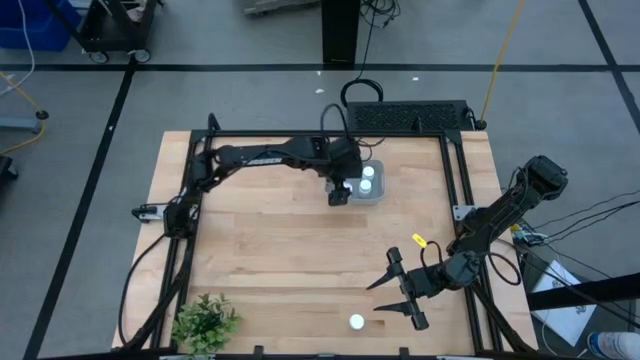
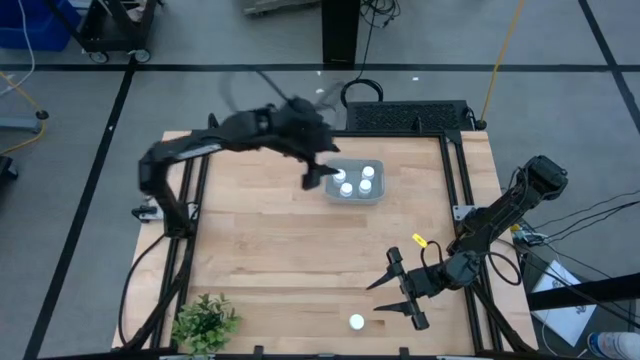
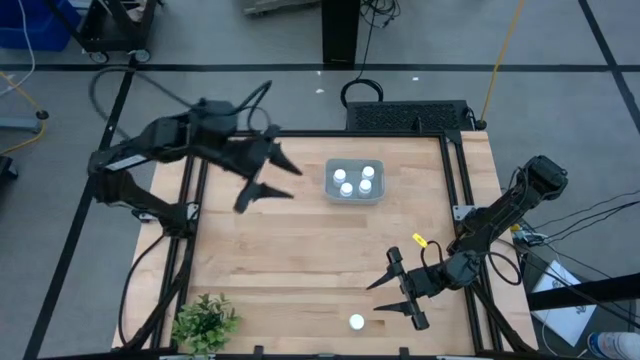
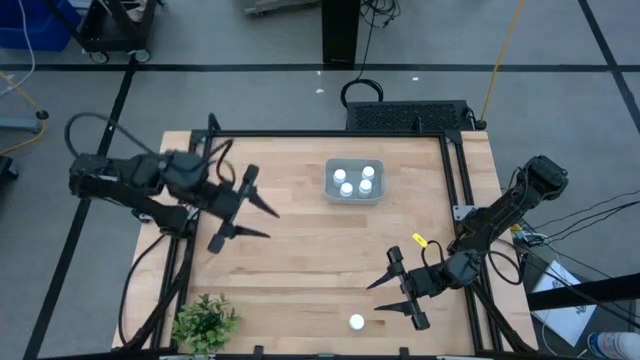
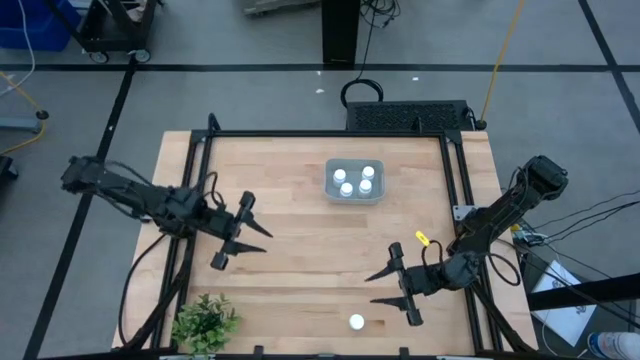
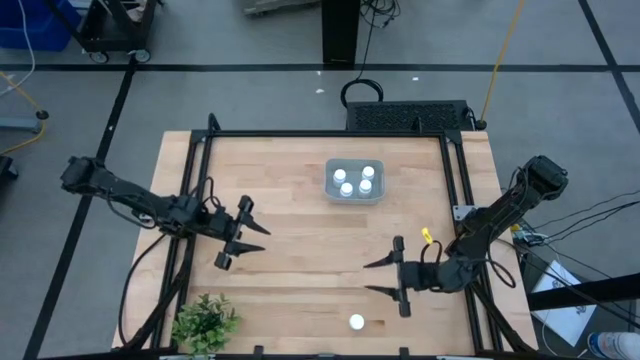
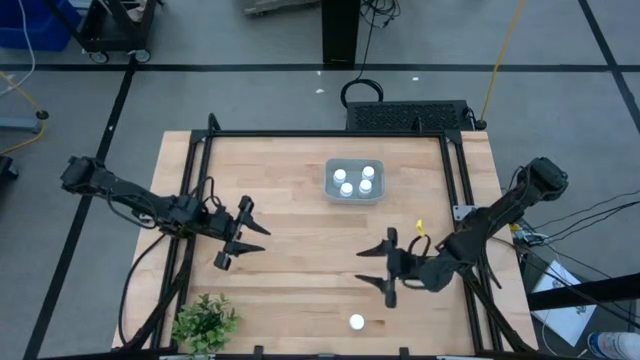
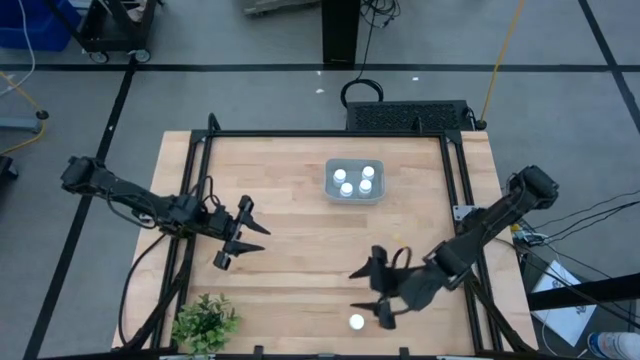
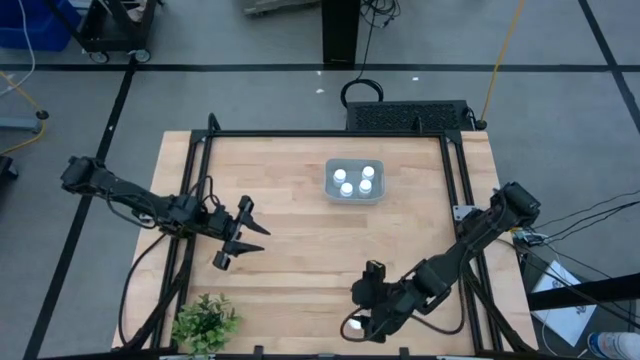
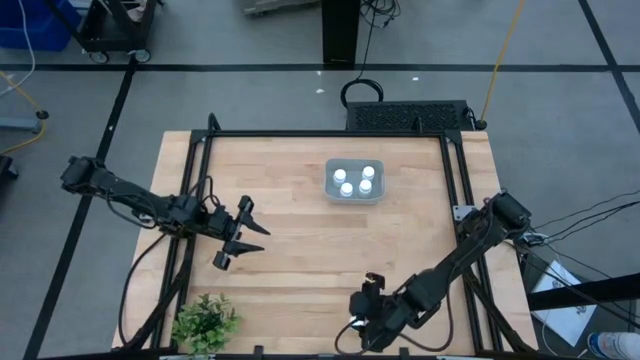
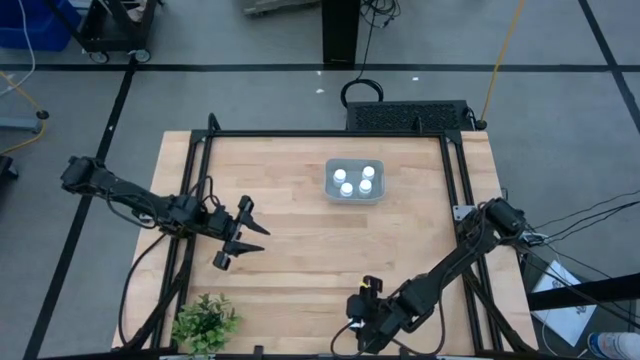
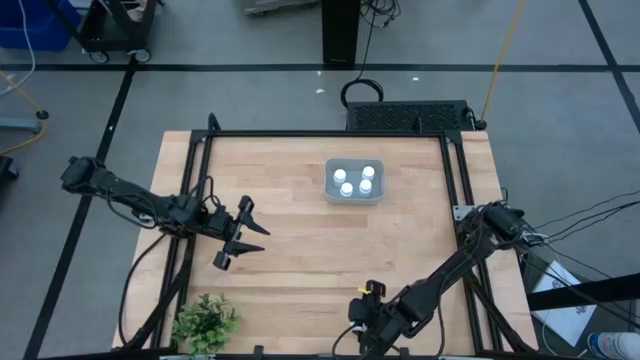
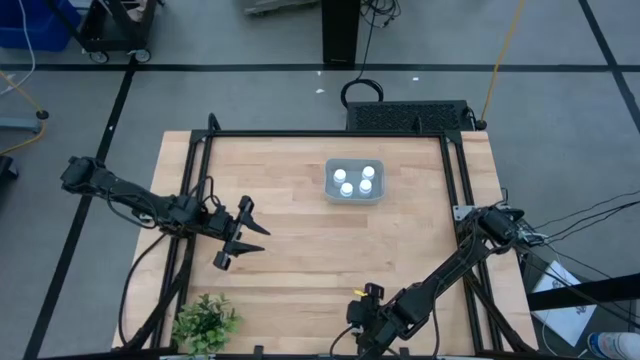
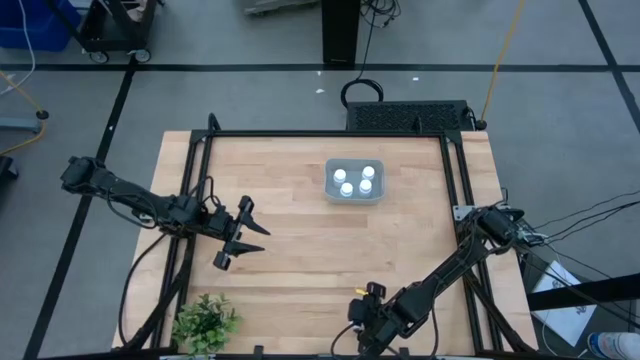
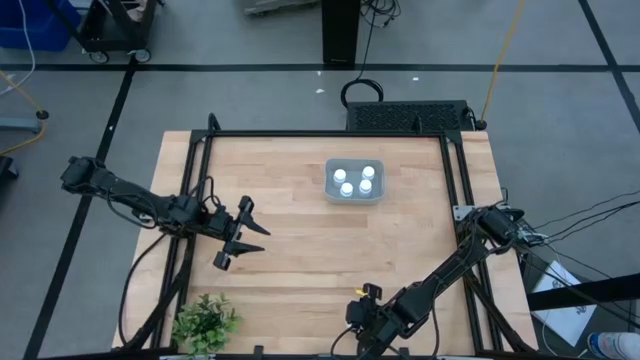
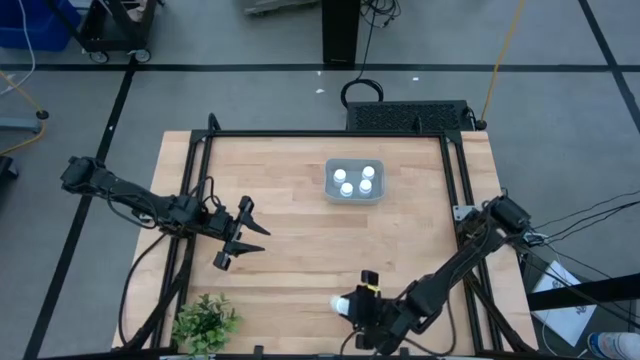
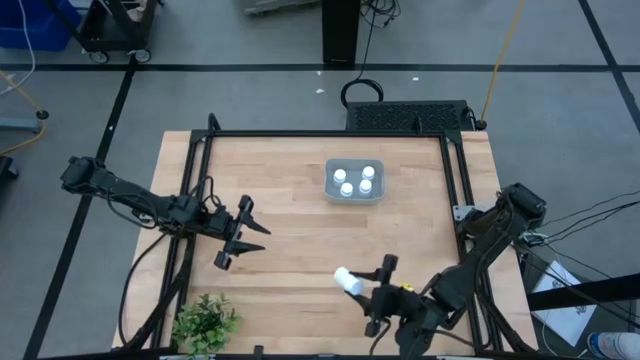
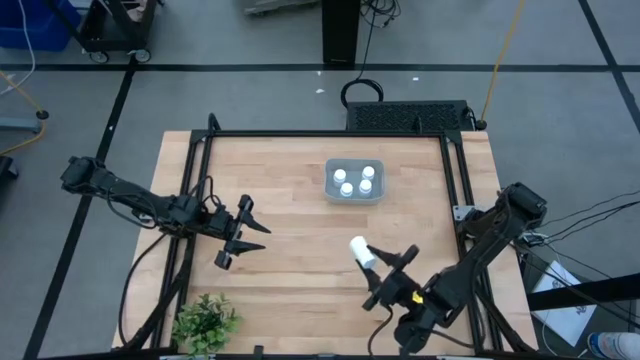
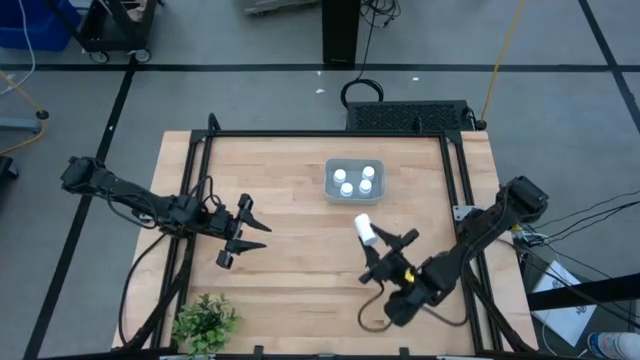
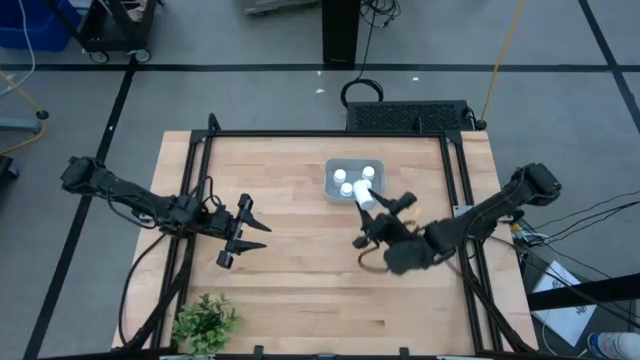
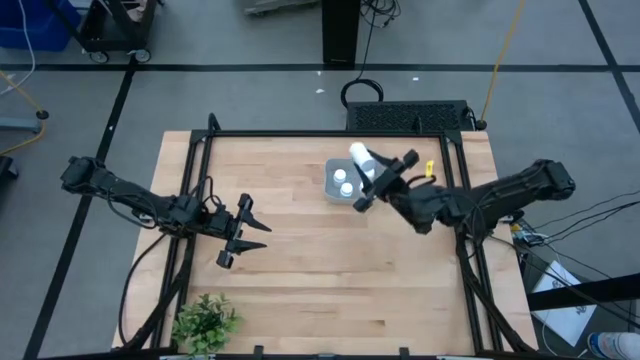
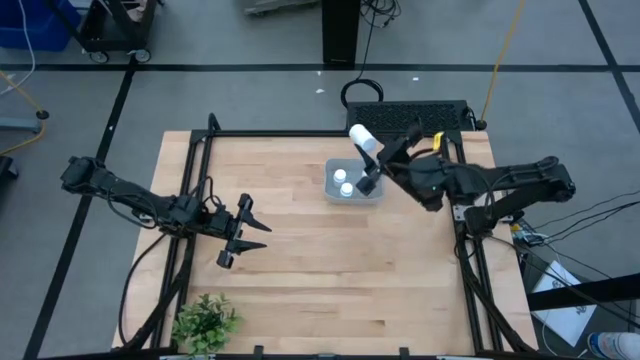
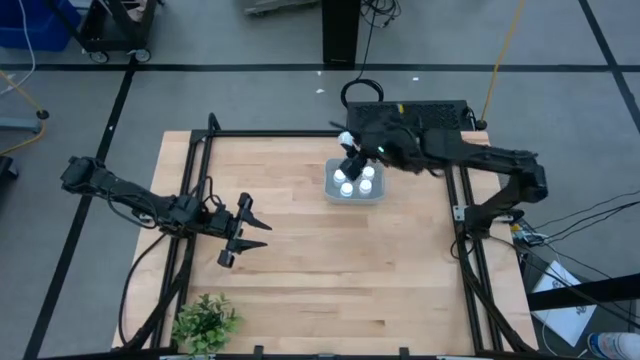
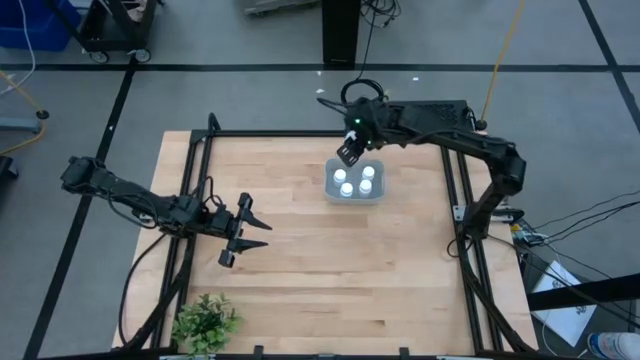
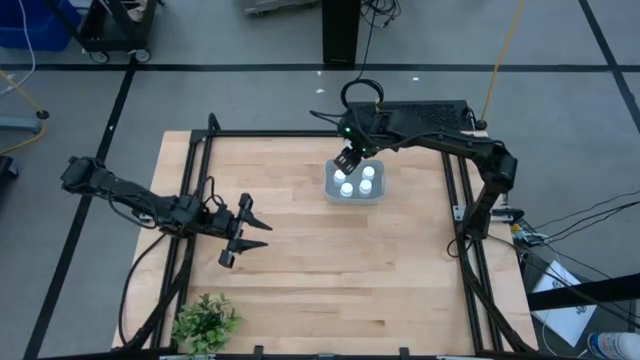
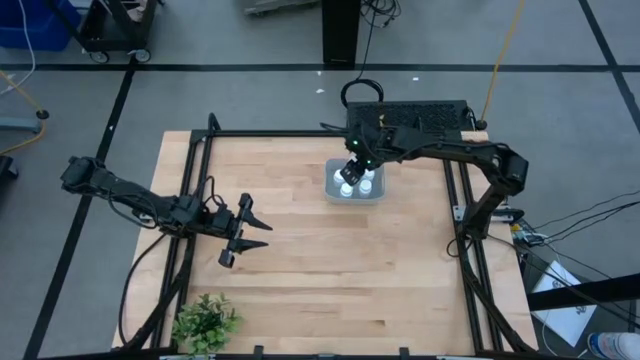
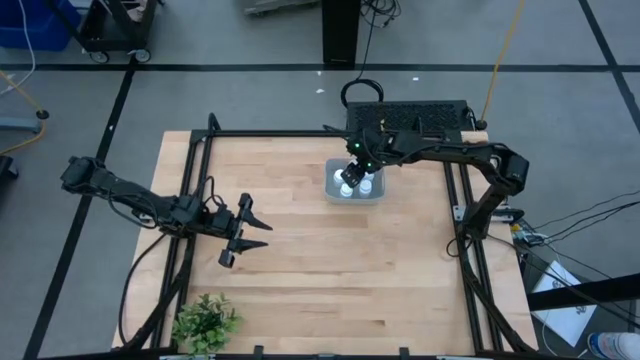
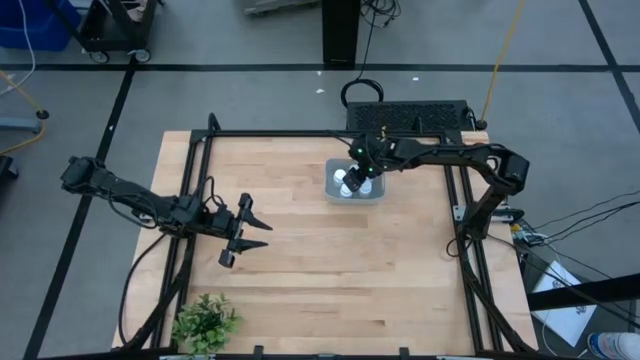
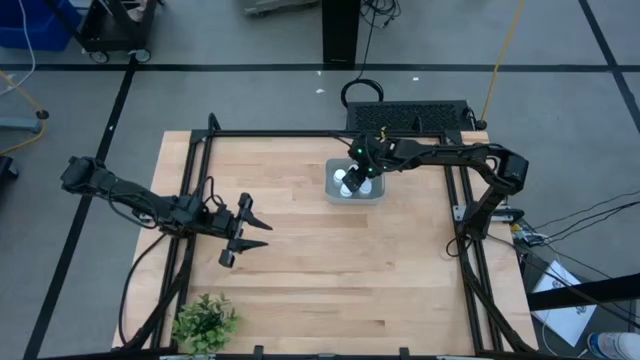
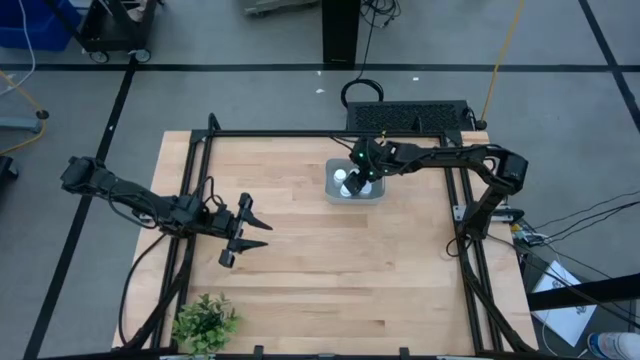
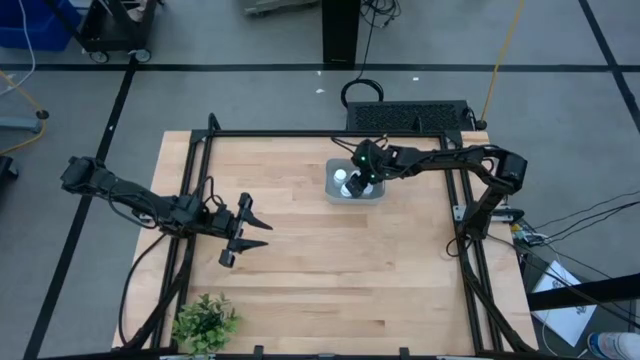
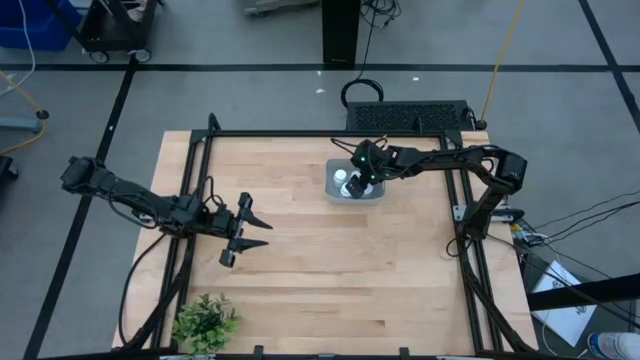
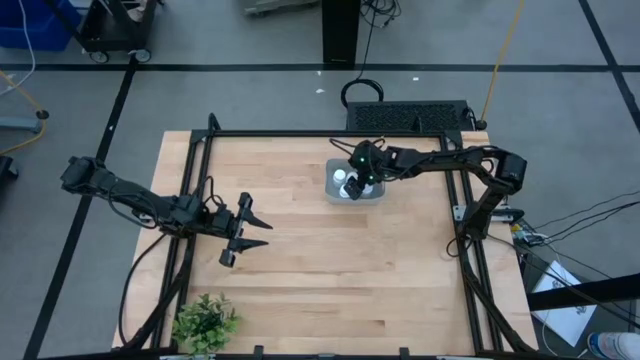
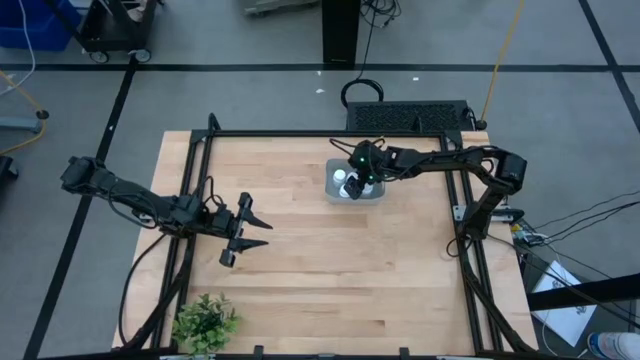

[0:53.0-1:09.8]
Task: Pick and place pill bottles into a basket
Put the white medicine bottle into the gray bin

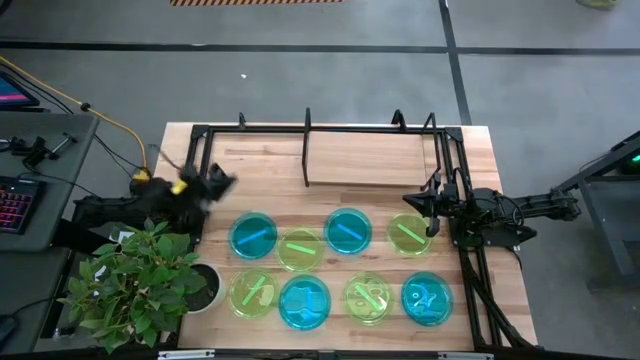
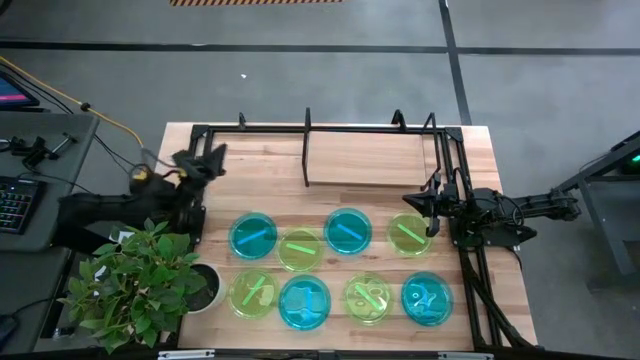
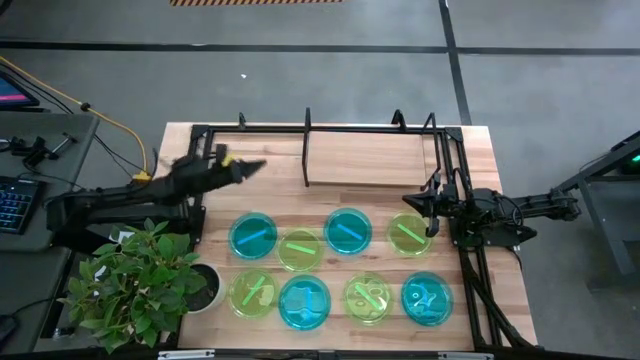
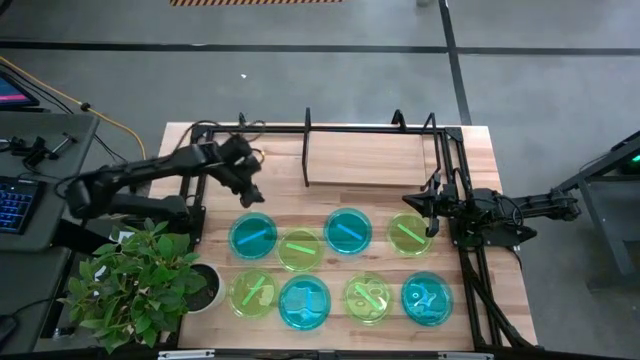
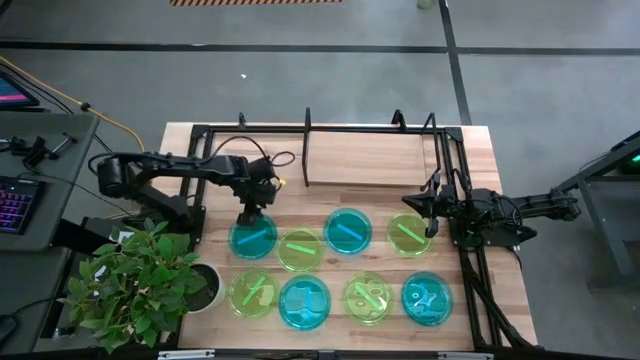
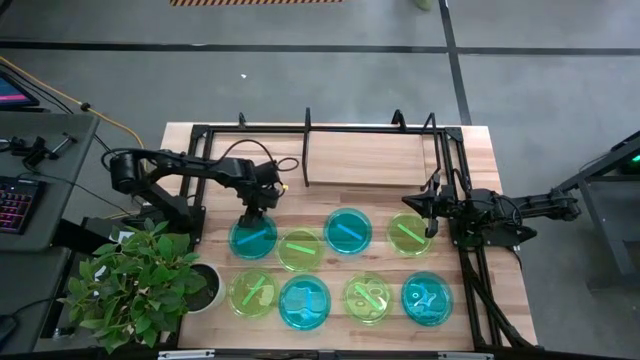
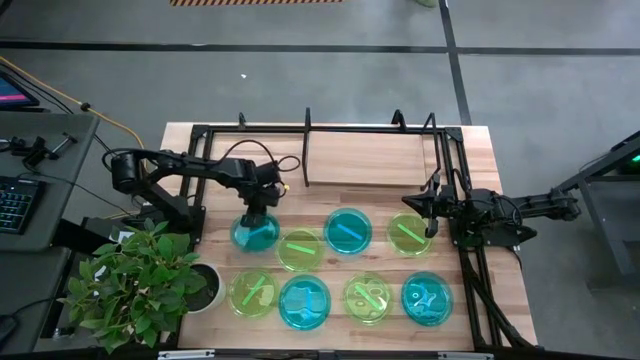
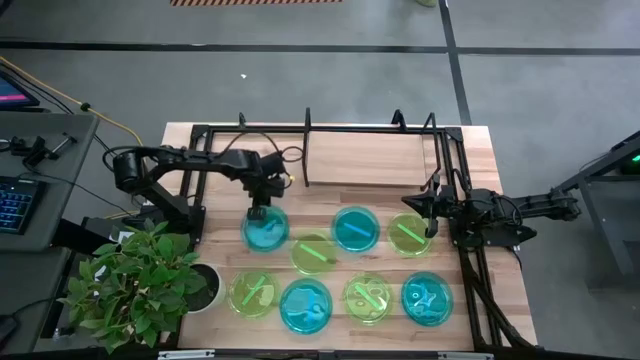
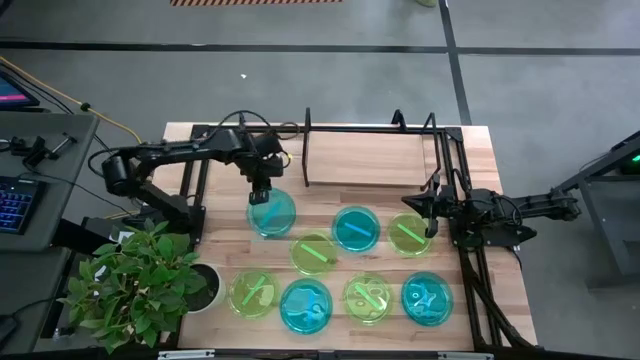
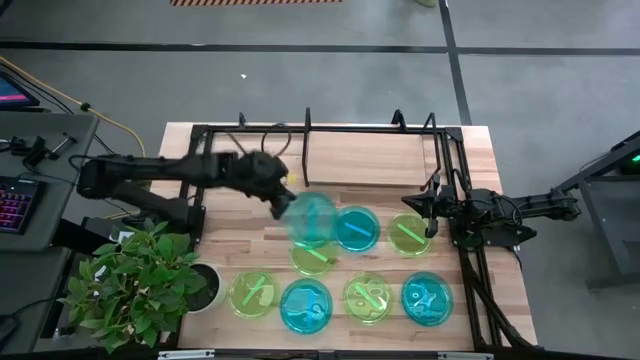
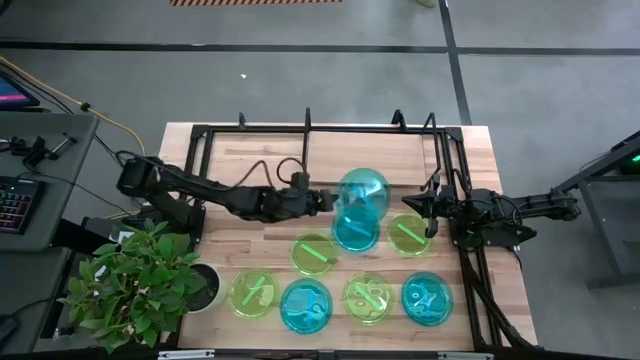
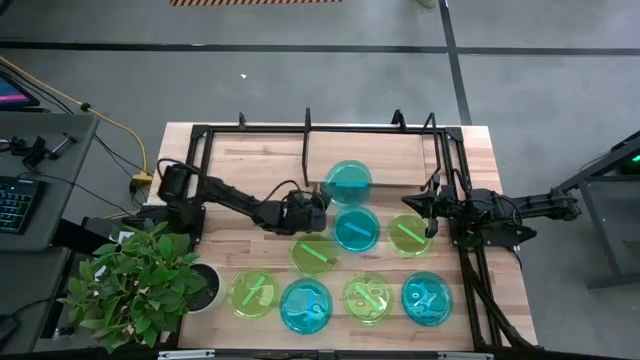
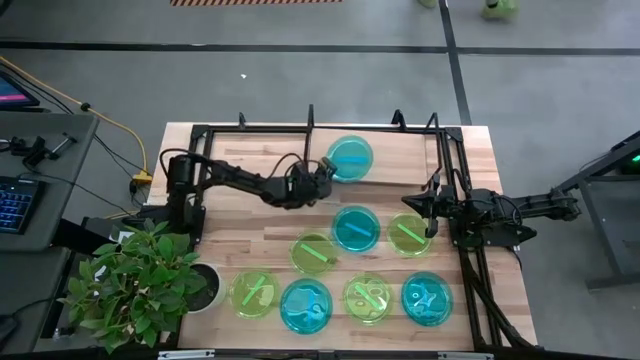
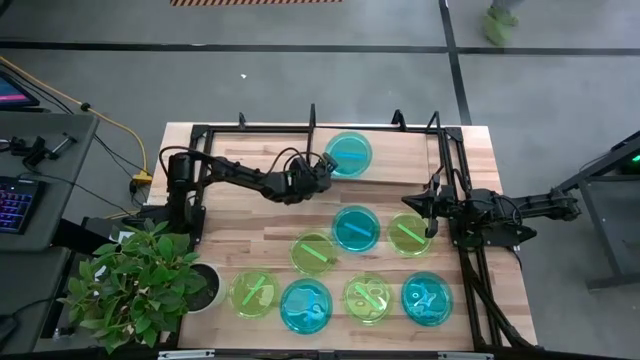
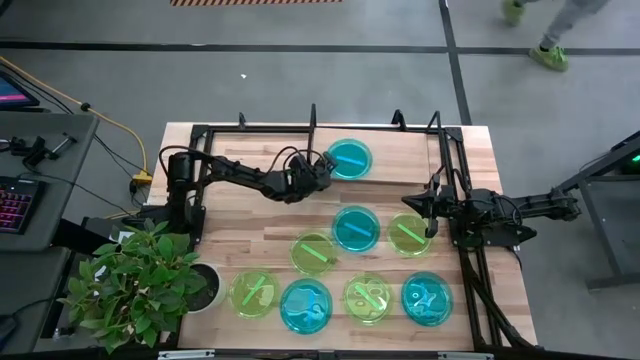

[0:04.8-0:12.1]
Task: Place and stack plates onto a shelf
Put the top left blue plate on the shelf
